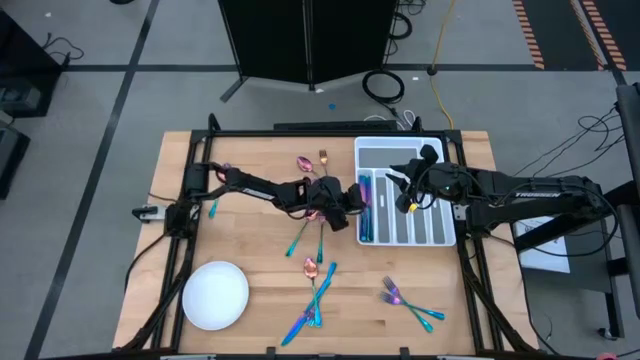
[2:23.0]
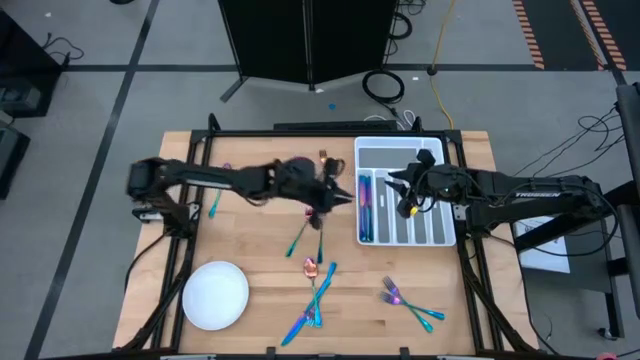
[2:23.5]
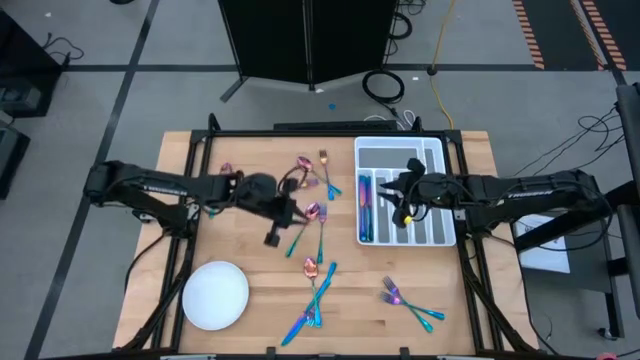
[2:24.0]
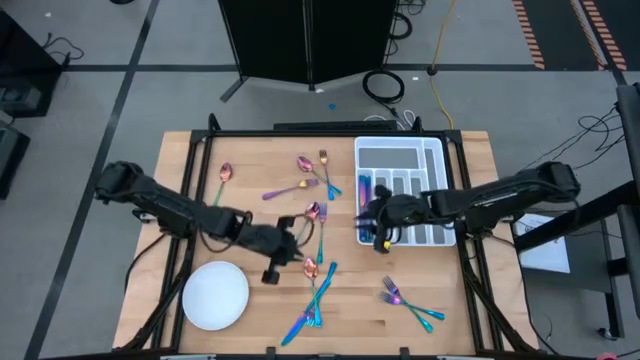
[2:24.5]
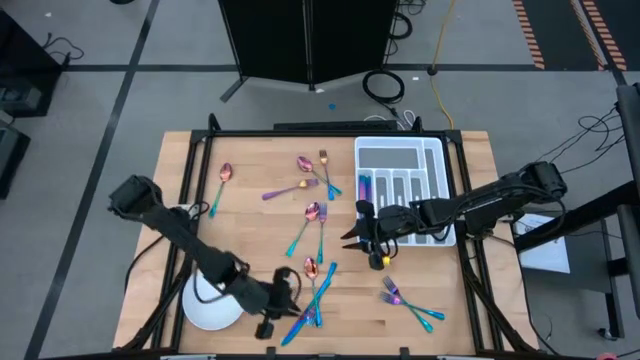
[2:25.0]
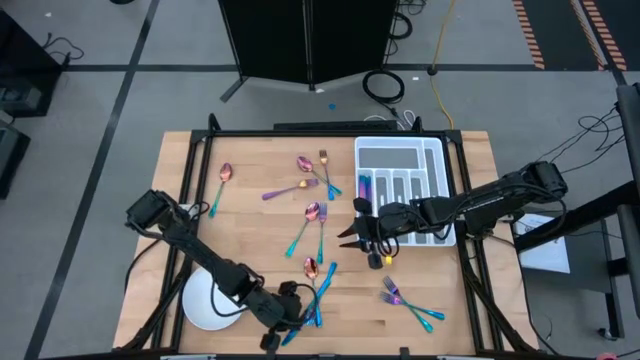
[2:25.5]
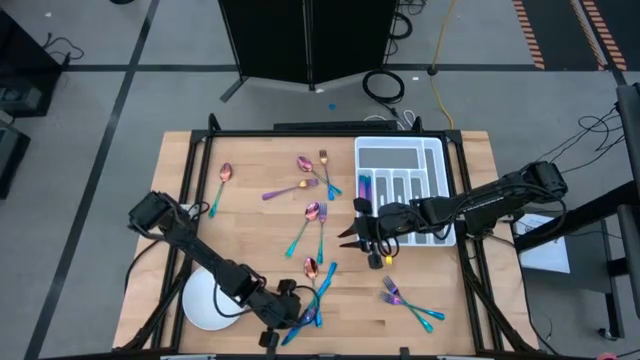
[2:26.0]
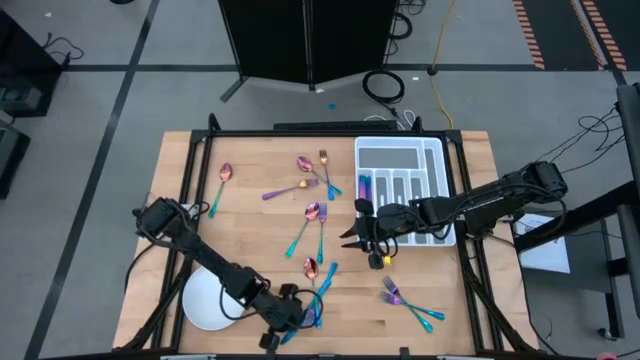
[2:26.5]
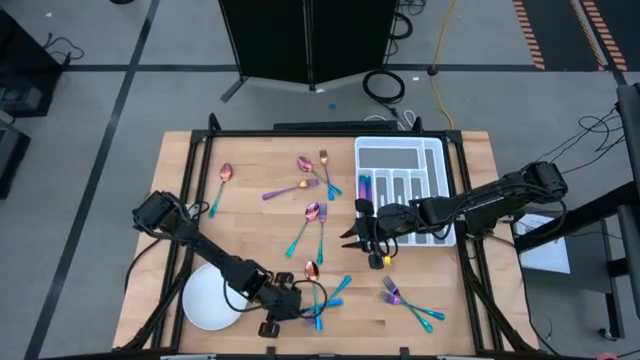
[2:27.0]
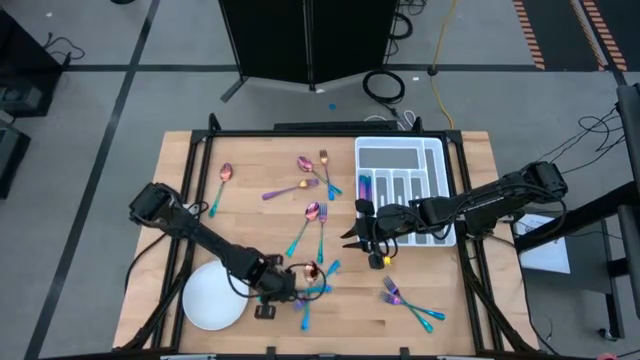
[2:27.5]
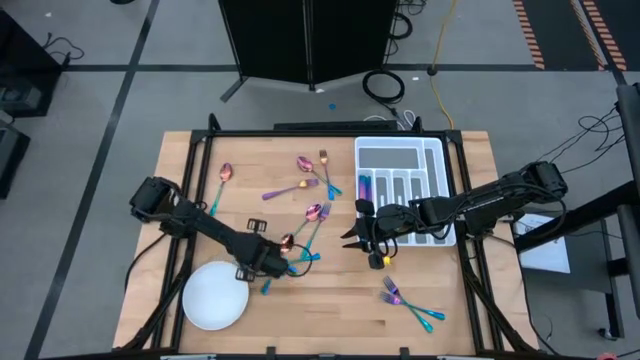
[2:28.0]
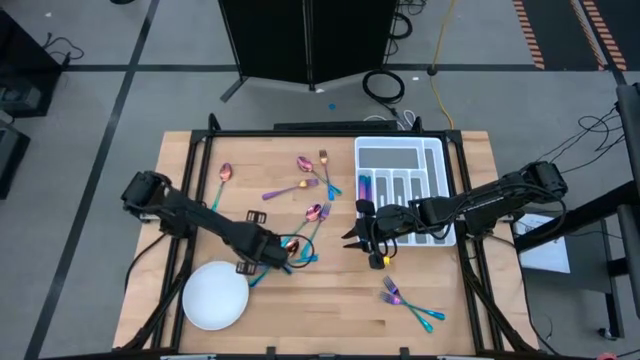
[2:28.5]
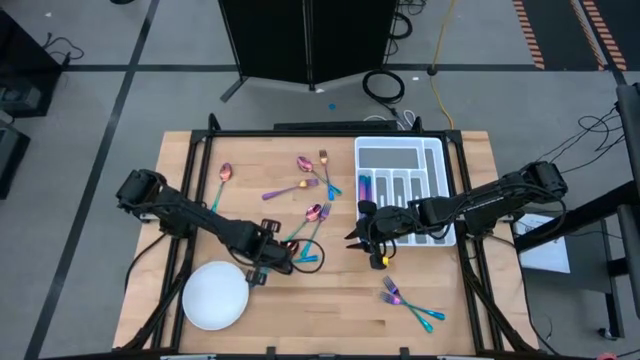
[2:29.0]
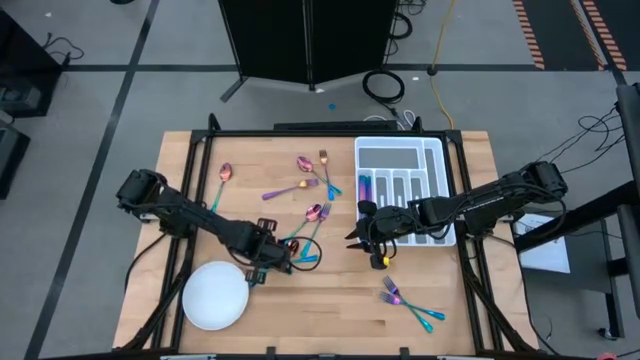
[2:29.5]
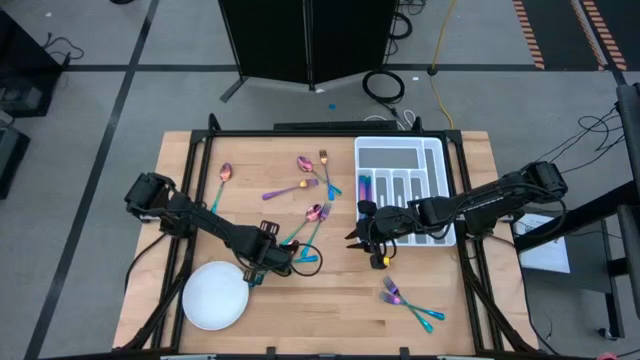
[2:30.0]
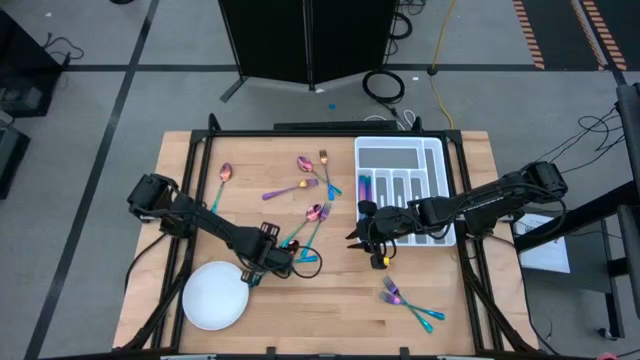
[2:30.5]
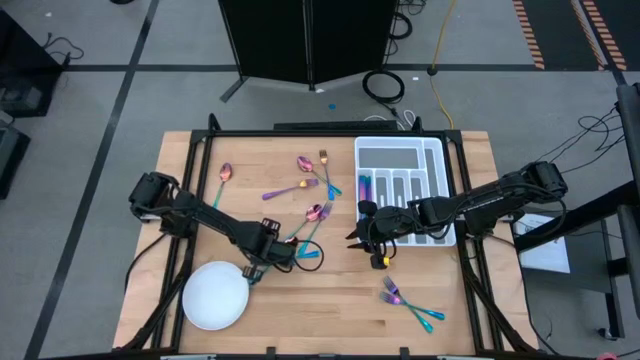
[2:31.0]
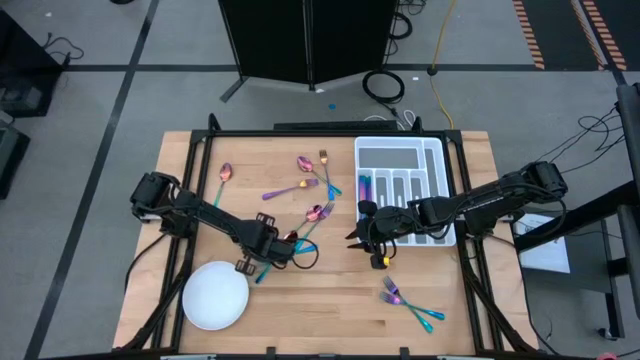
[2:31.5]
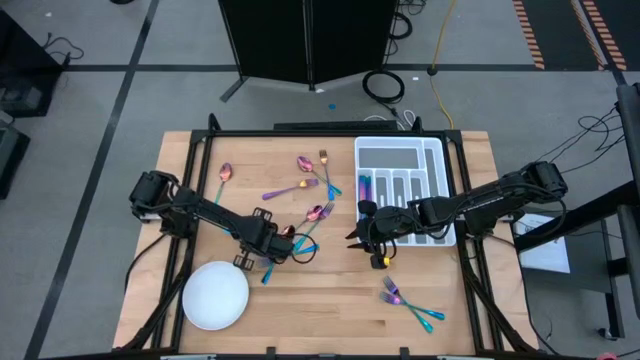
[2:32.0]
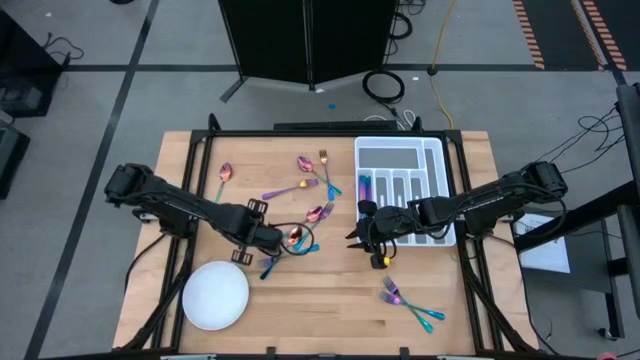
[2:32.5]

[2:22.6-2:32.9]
Task: Sort silverware
Put the blue knife into the utensil organizer

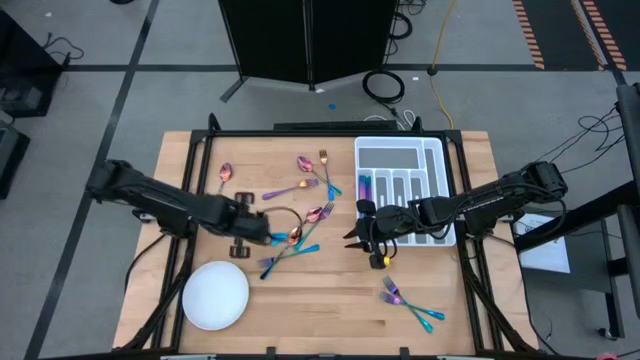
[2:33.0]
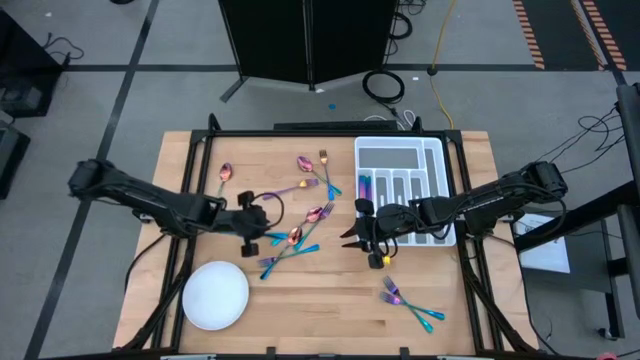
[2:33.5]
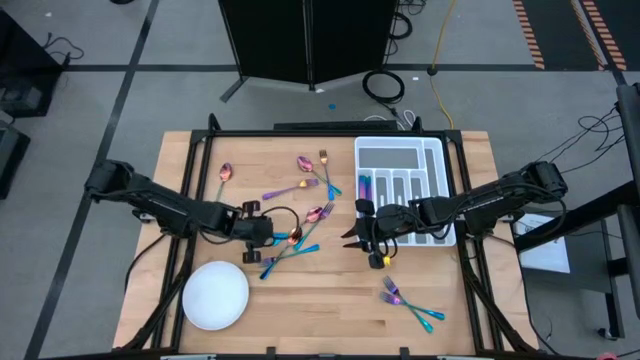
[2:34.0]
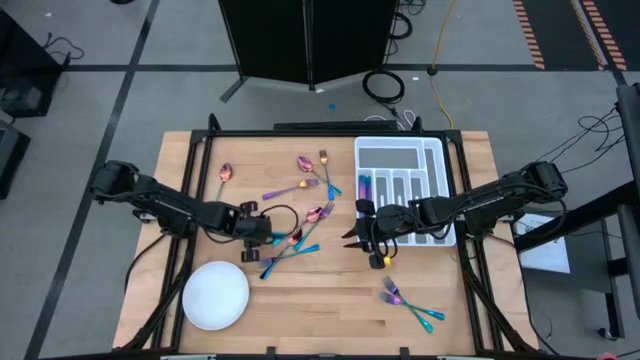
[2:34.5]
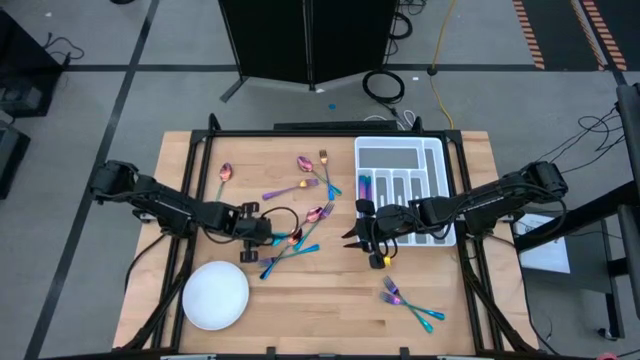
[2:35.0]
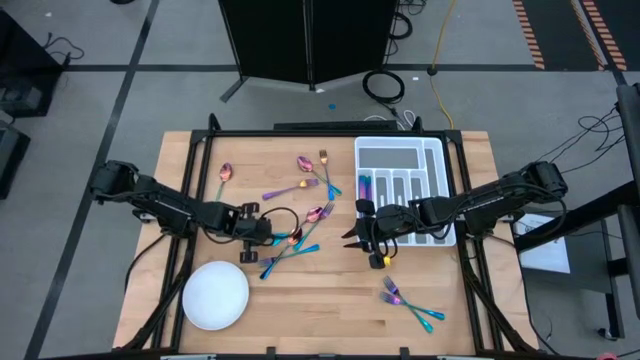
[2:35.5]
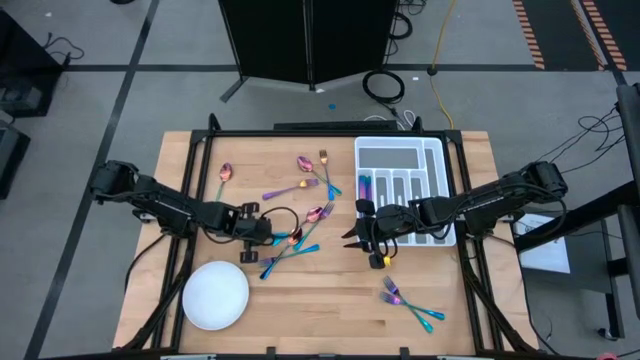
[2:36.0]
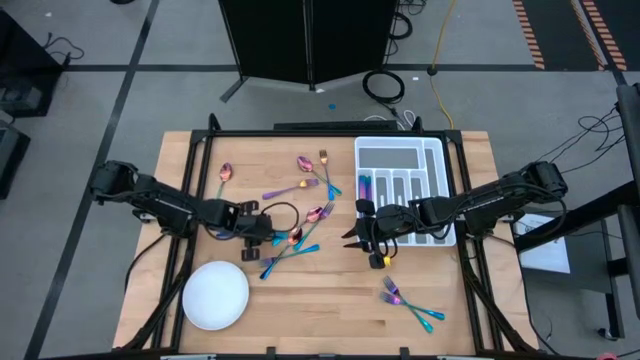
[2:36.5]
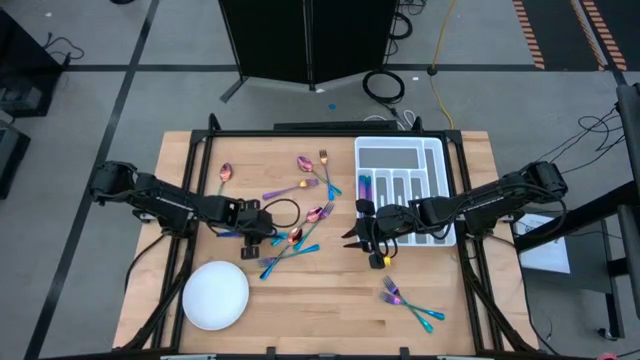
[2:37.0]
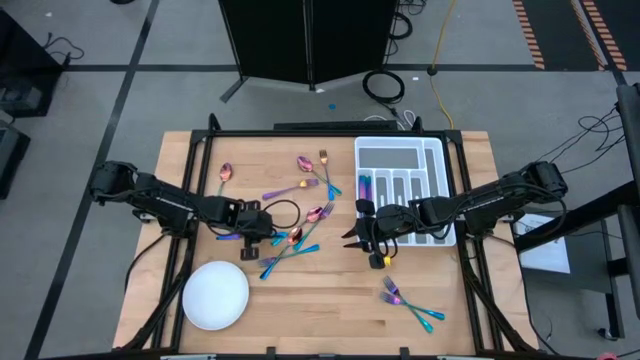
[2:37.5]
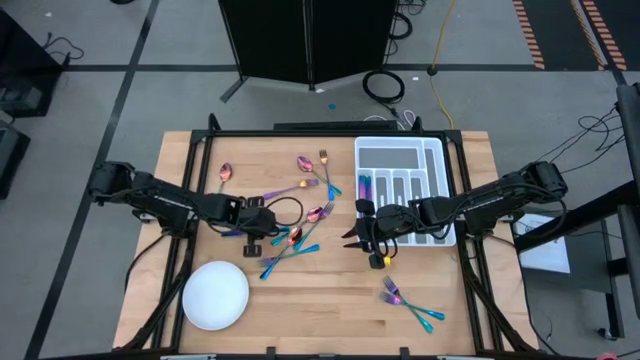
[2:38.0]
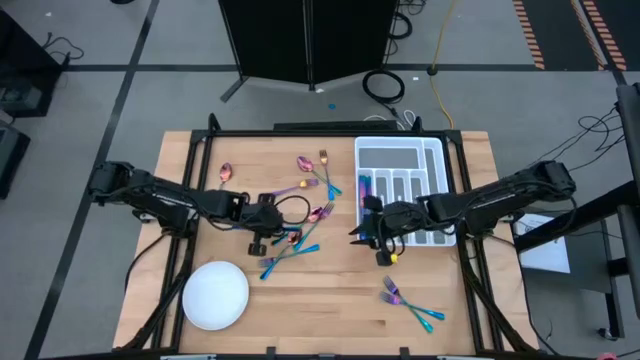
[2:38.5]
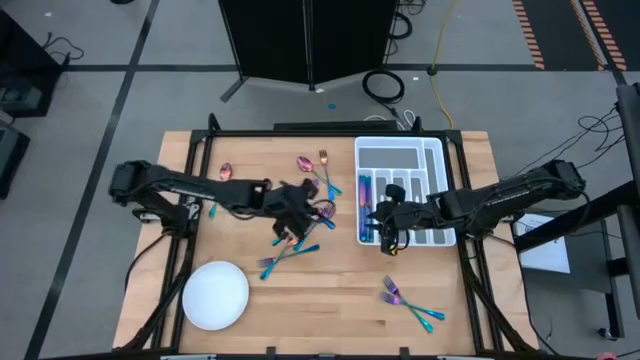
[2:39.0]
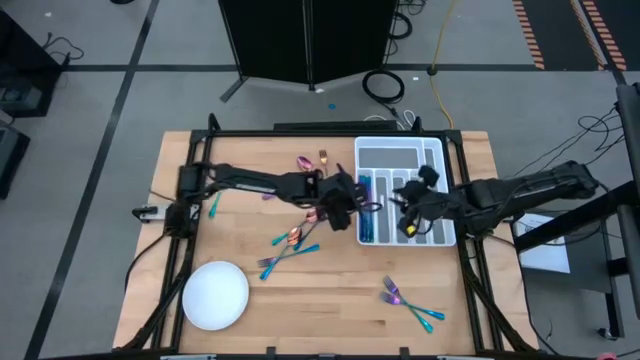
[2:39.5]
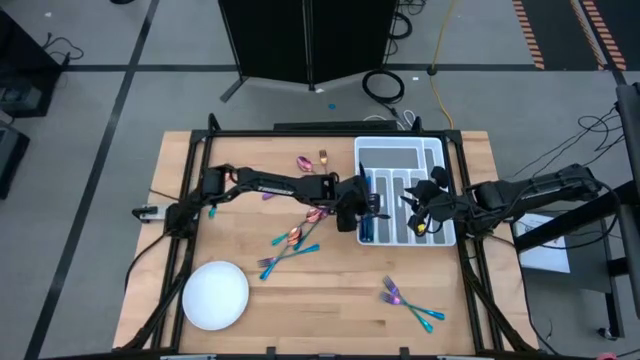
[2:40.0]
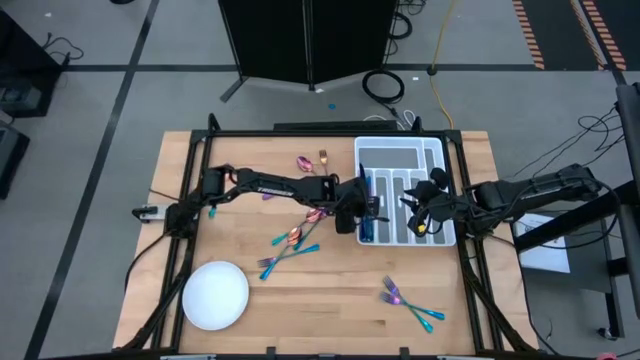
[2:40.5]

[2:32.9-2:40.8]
Put the blue knife into the utensil organizer

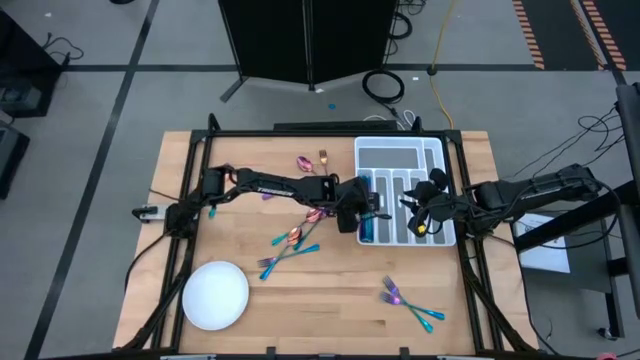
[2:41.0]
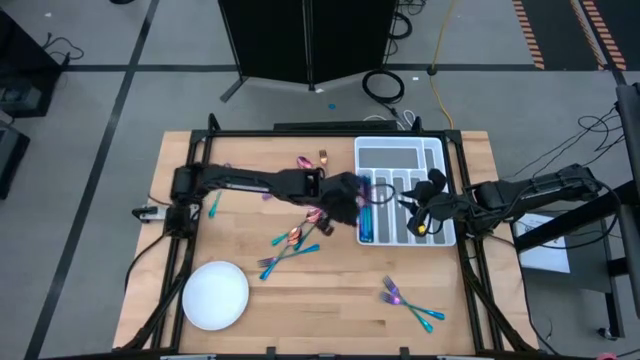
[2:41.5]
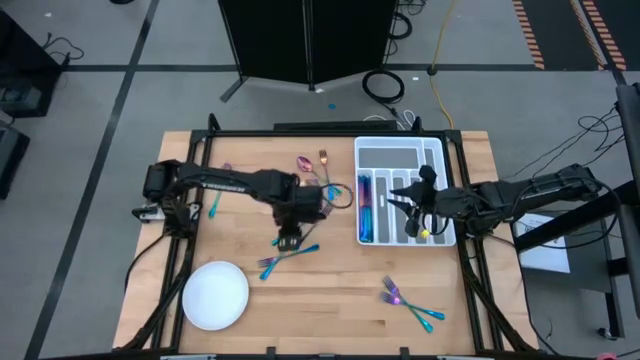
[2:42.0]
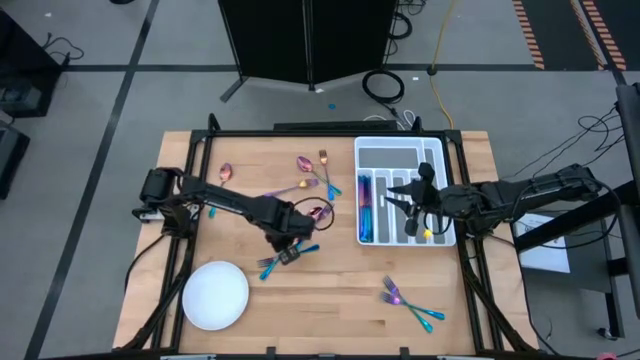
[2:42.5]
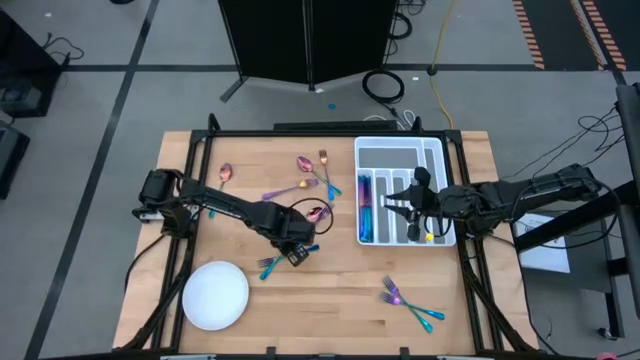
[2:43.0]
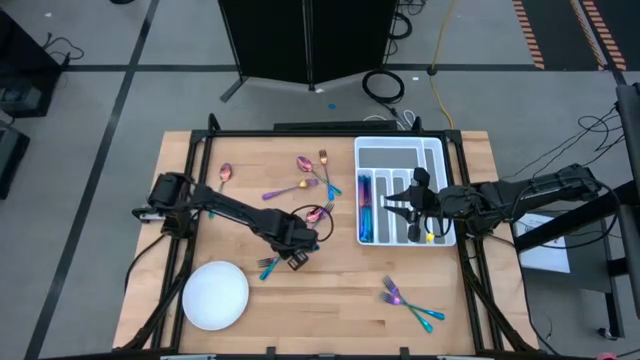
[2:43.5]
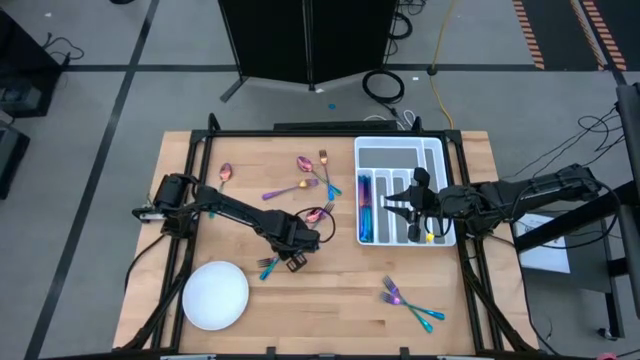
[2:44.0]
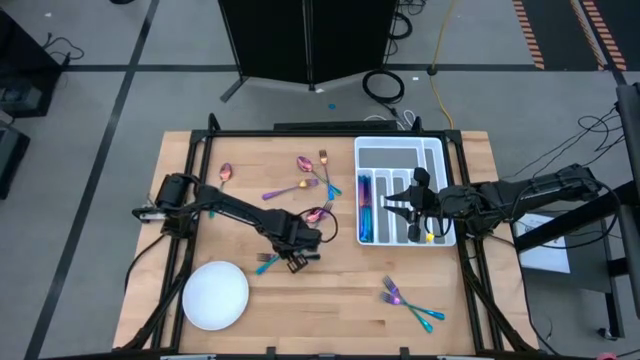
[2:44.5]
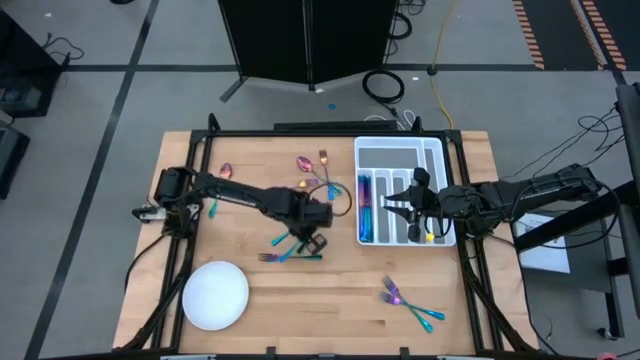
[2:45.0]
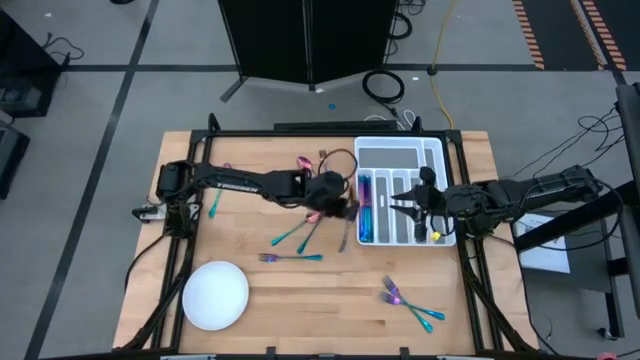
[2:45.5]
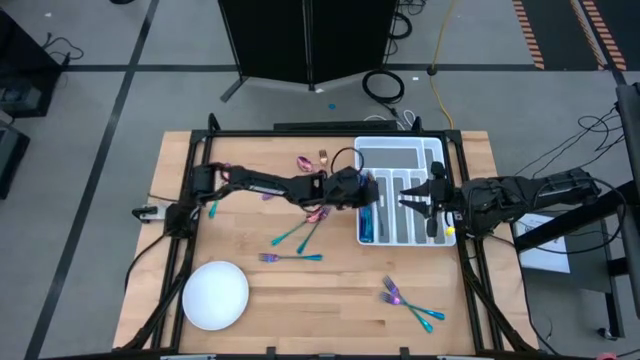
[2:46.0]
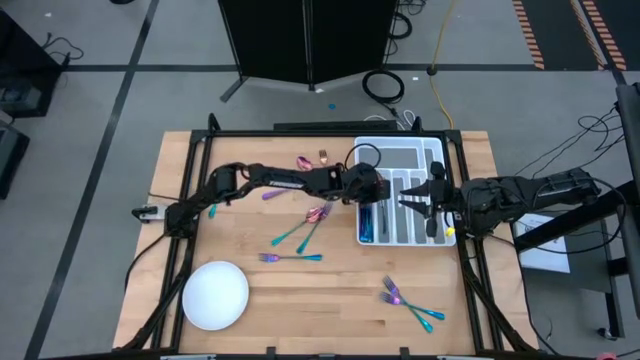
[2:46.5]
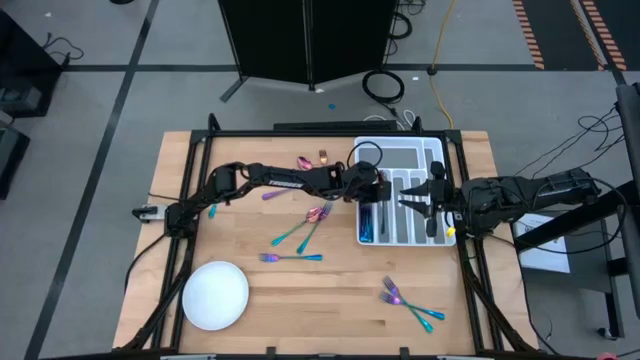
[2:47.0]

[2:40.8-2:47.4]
Put the blue spoon into the utensil organizer
